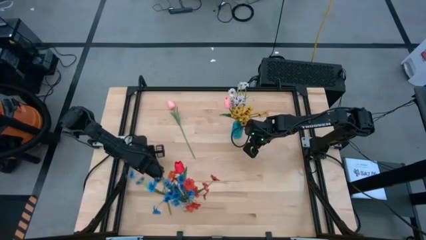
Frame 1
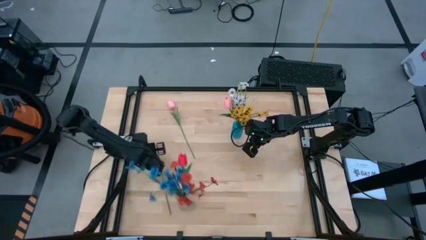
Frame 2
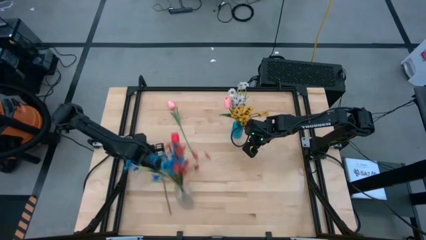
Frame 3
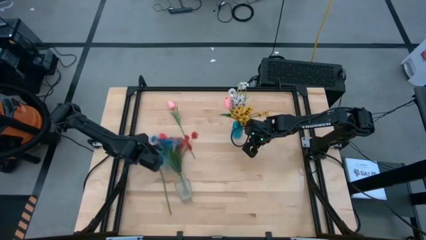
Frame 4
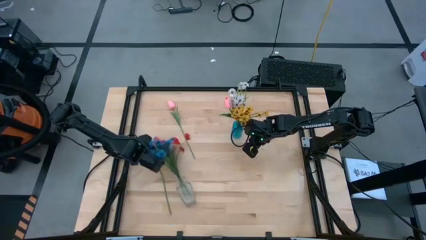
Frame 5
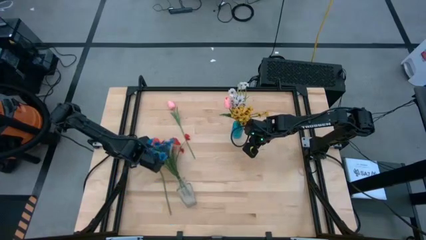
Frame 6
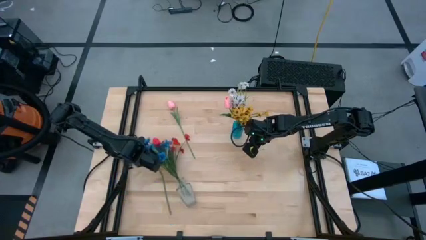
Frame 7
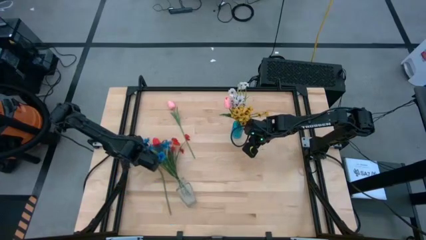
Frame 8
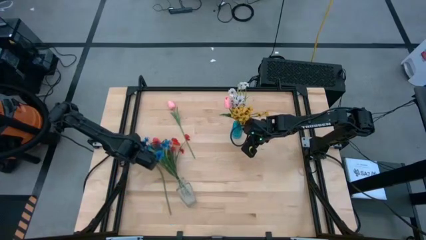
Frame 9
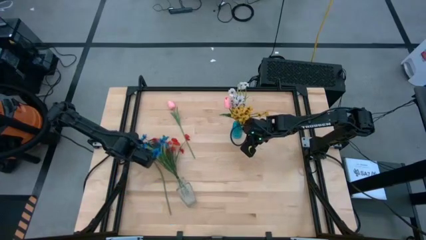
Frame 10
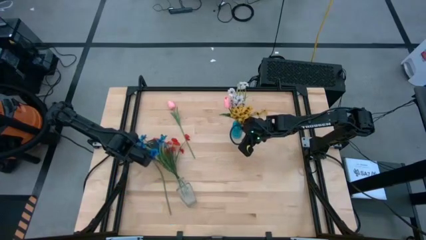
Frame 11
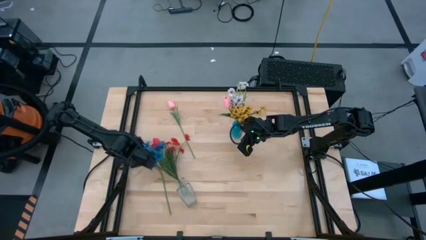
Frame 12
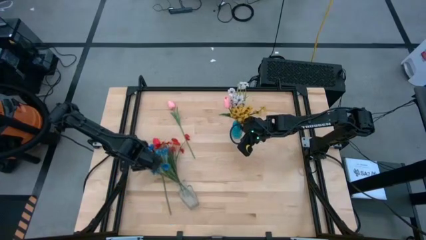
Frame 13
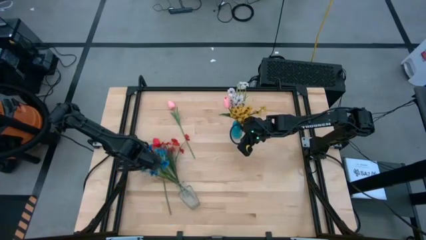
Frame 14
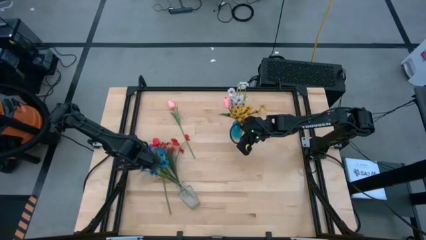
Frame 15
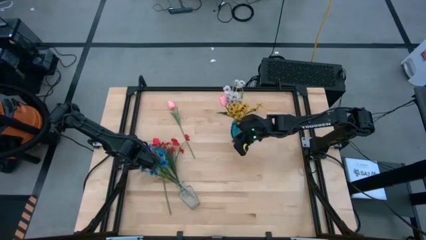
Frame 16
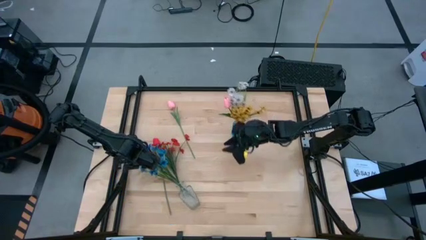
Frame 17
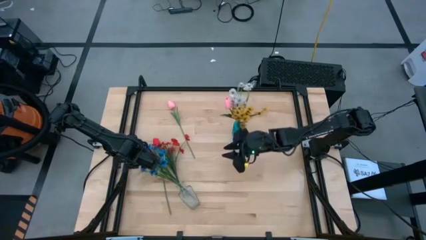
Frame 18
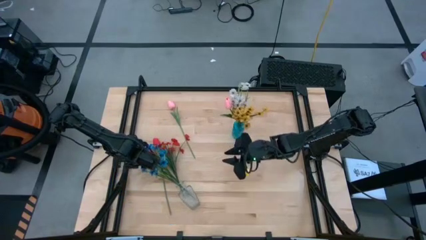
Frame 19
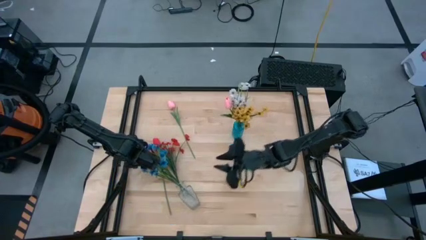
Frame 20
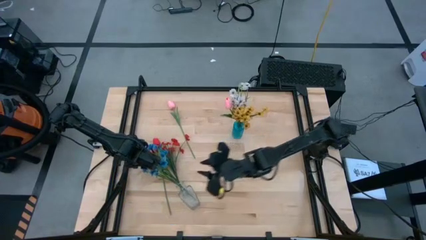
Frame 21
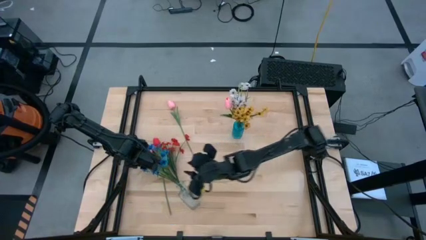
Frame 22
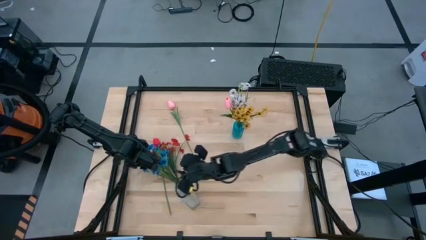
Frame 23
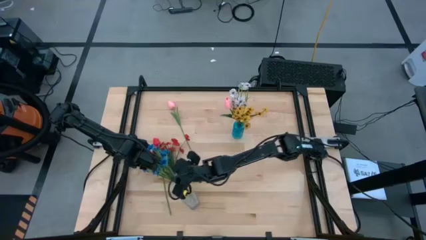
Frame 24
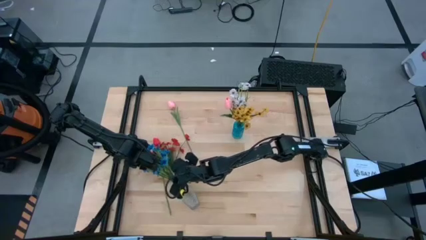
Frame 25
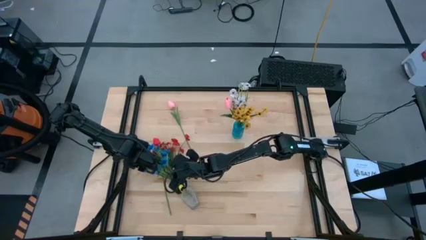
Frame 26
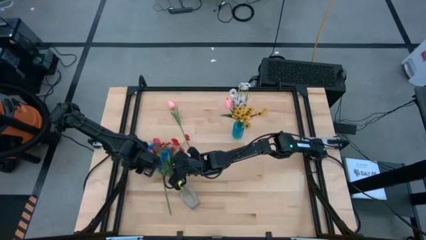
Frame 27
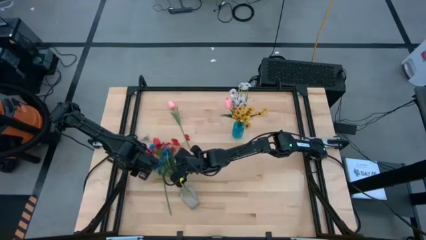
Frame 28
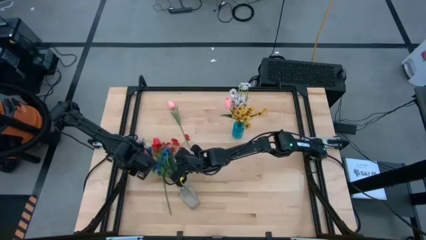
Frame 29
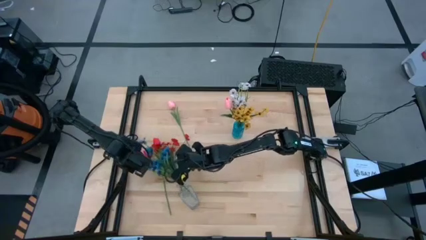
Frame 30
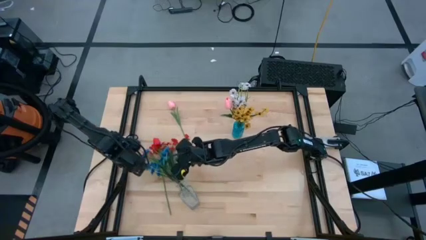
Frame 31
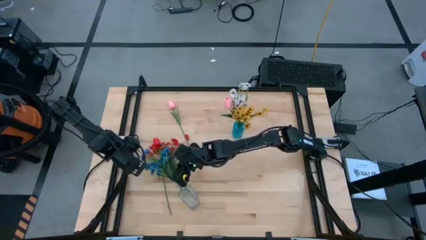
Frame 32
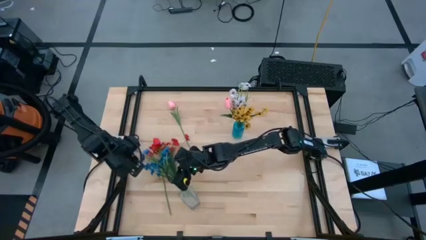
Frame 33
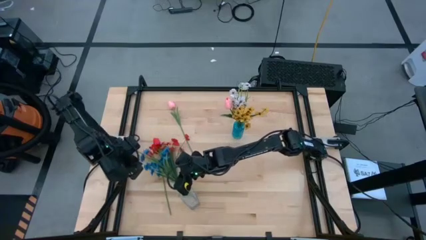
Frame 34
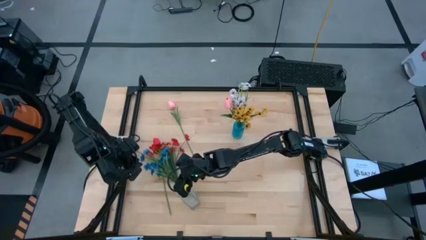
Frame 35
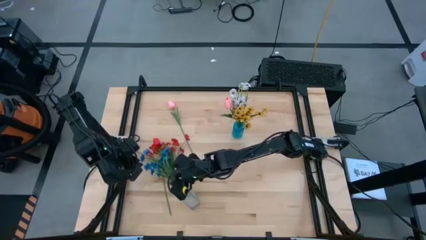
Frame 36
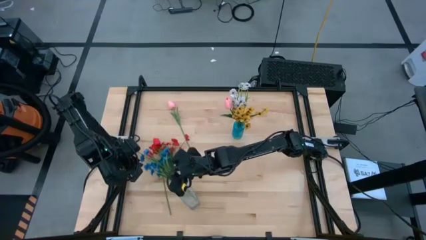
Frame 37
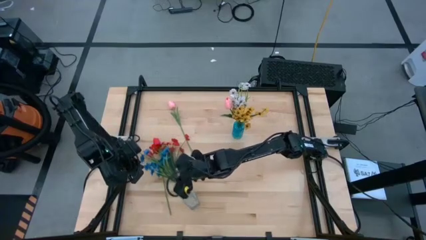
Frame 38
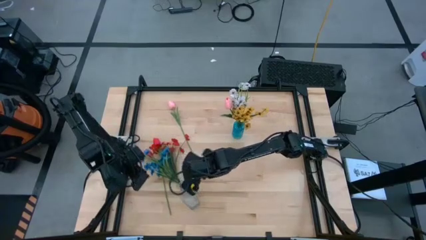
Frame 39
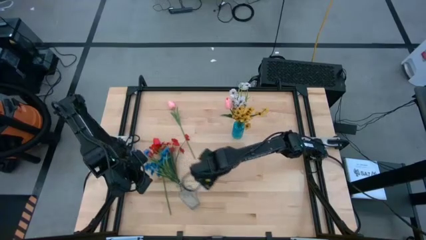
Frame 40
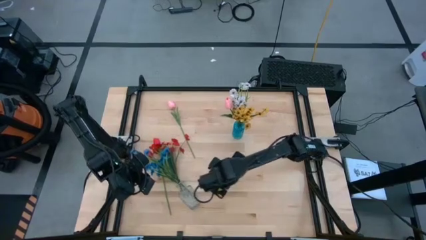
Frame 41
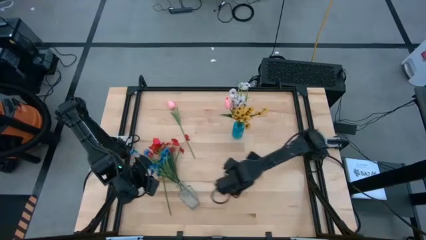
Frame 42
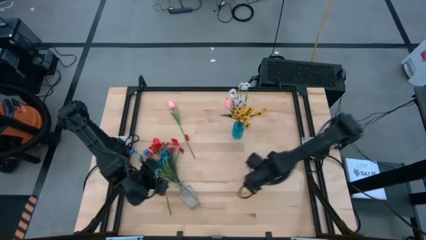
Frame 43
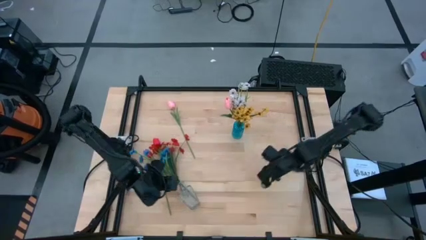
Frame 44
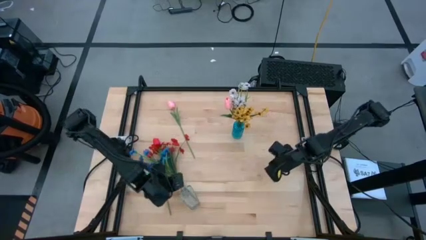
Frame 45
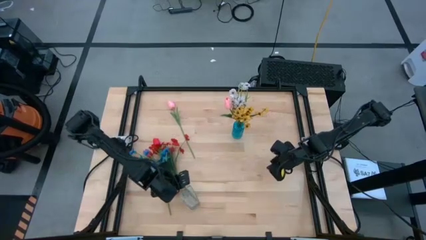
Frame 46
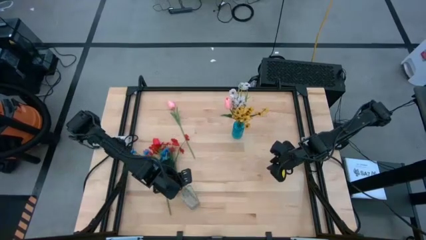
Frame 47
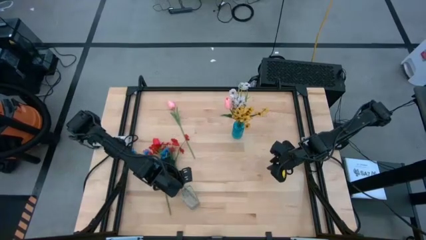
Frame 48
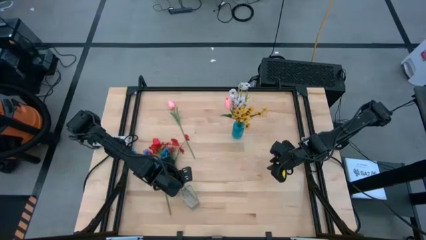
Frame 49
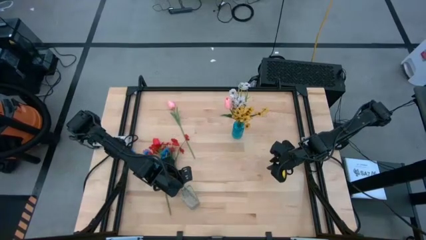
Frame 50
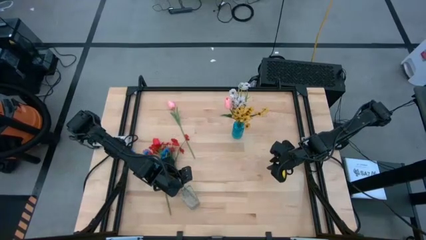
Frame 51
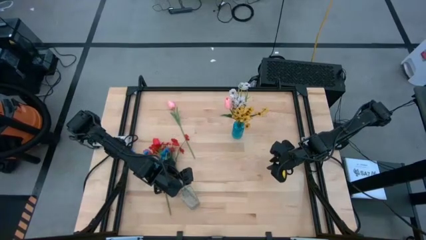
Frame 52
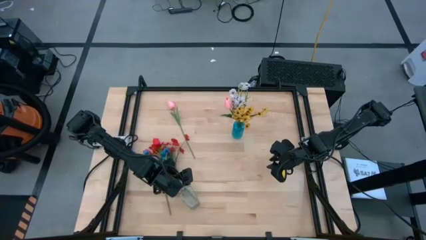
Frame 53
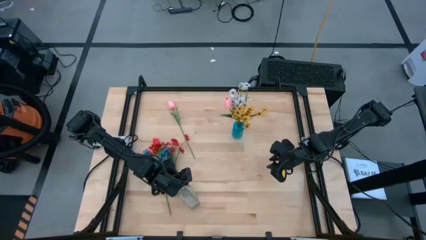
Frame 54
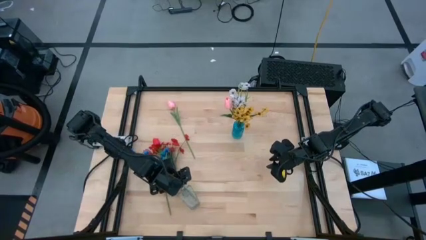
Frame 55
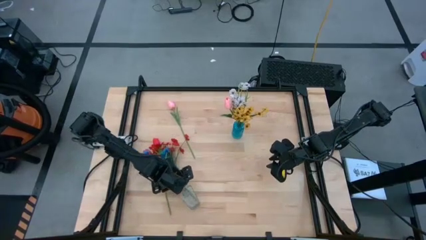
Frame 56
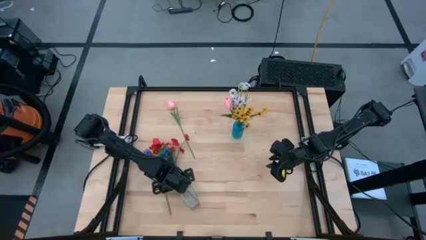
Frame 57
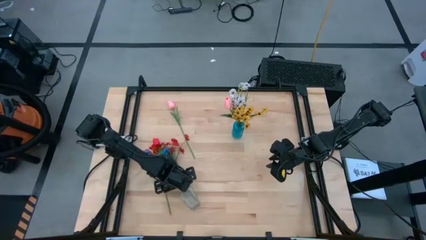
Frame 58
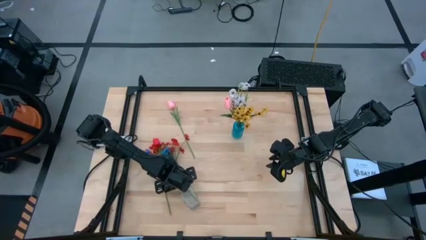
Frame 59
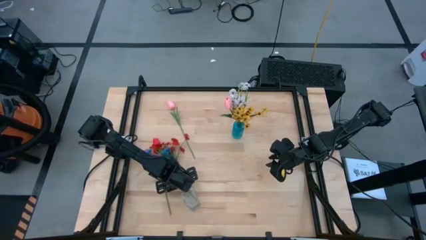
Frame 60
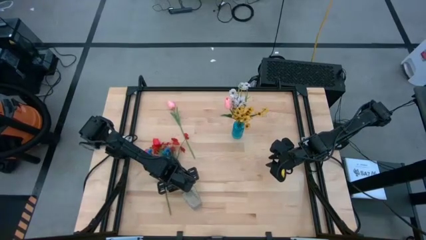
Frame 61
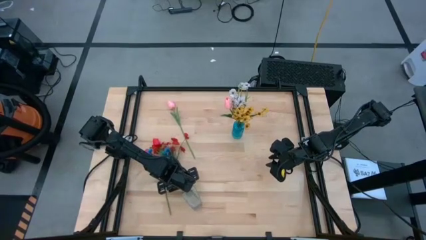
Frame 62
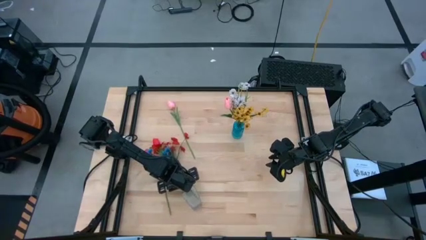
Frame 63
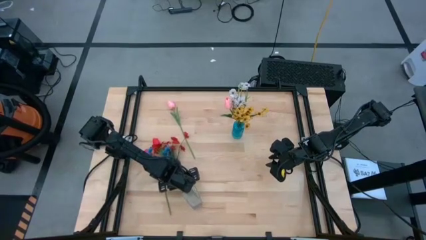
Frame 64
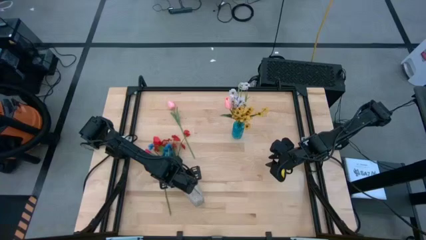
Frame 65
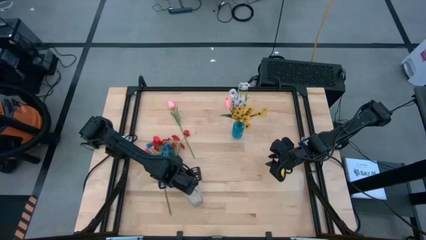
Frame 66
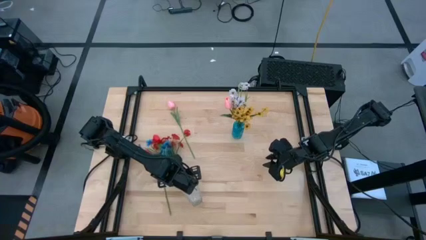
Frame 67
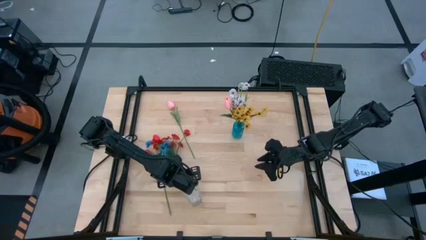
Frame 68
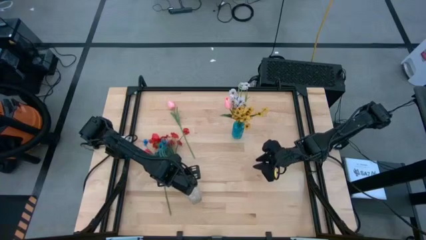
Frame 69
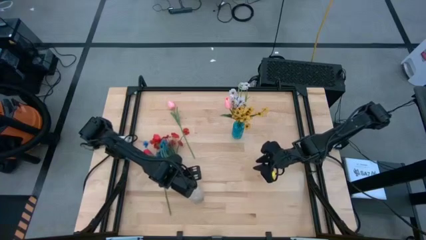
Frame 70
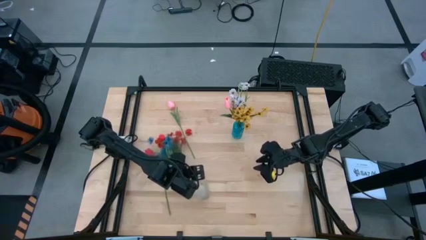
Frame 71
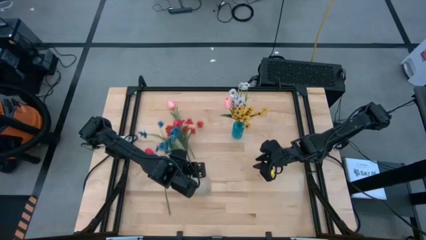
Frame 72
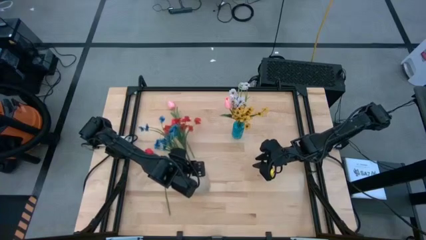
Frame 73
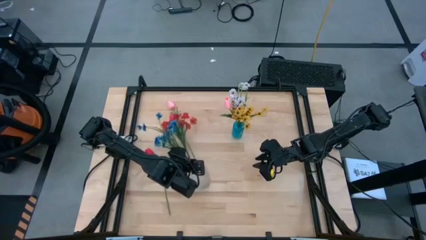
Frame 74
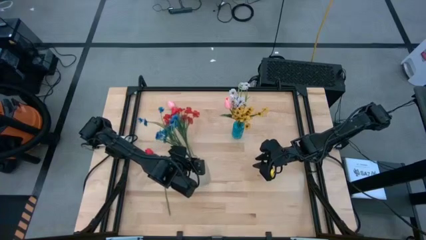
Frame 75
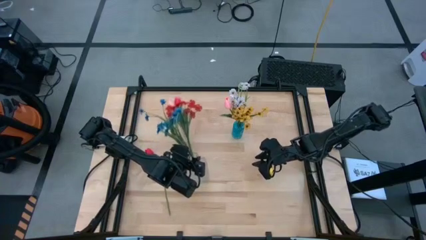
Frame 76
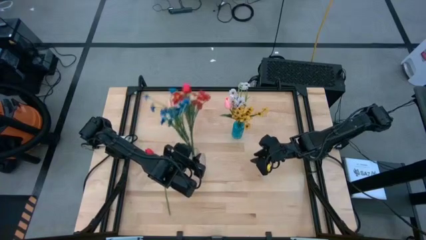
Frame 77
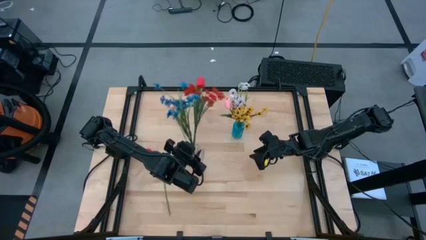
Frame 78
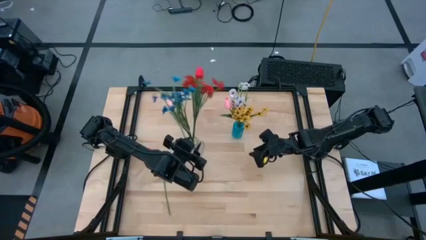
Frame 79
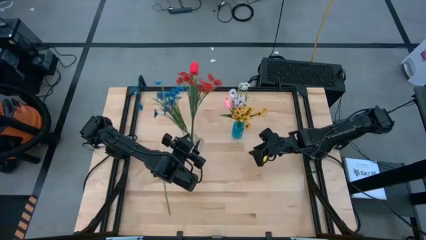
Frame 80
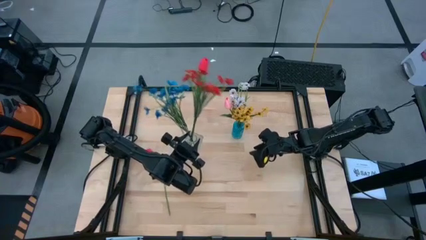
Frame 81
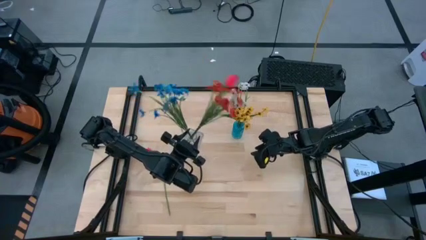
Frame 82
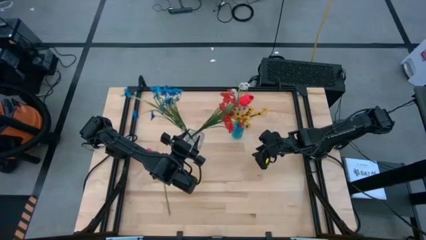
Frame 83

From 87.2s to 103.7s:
Task: Sort flowers into vase by color
Adjust the transparent vase
